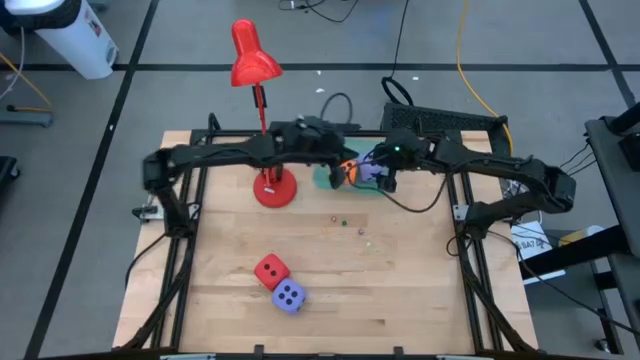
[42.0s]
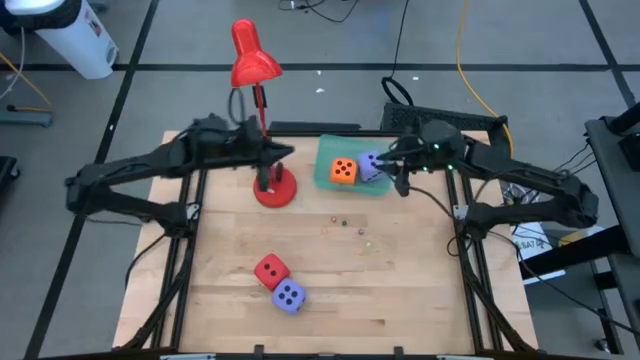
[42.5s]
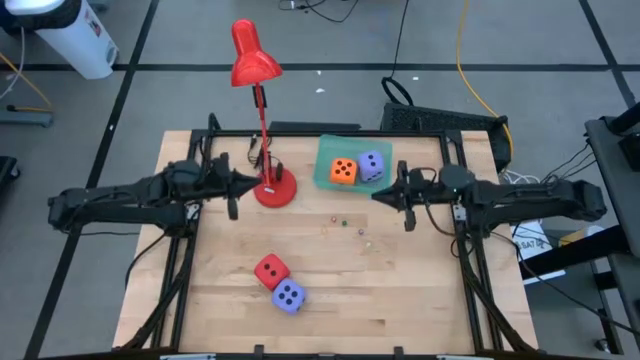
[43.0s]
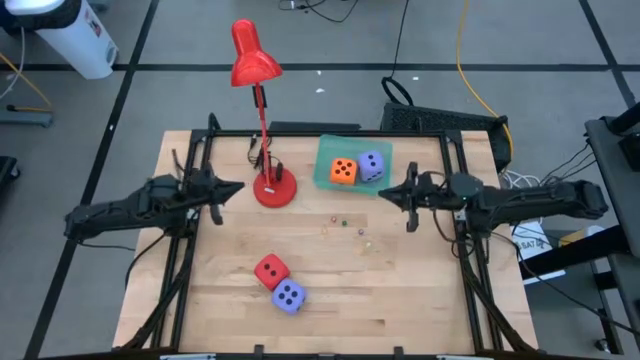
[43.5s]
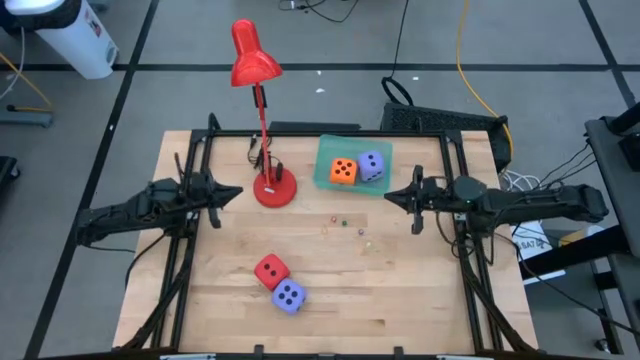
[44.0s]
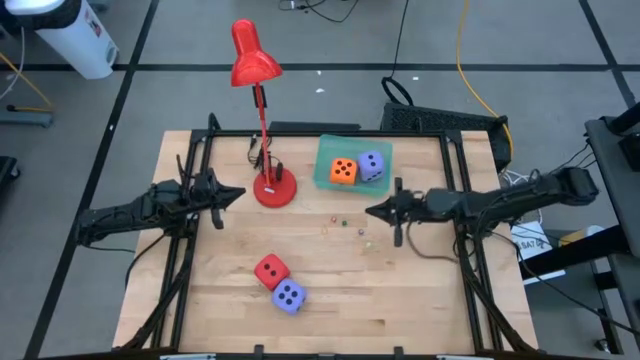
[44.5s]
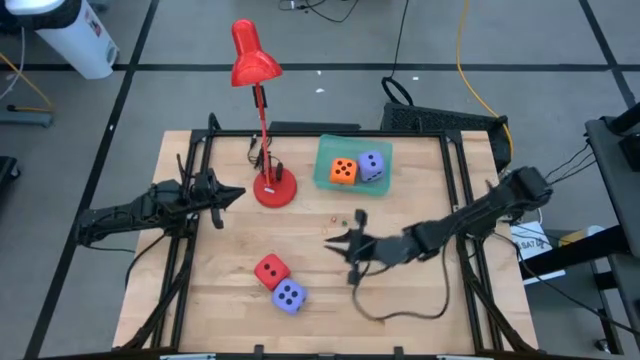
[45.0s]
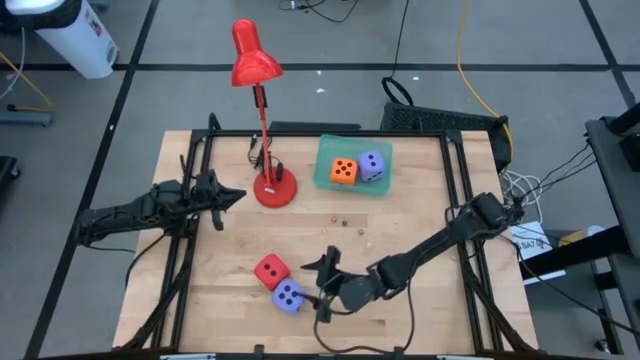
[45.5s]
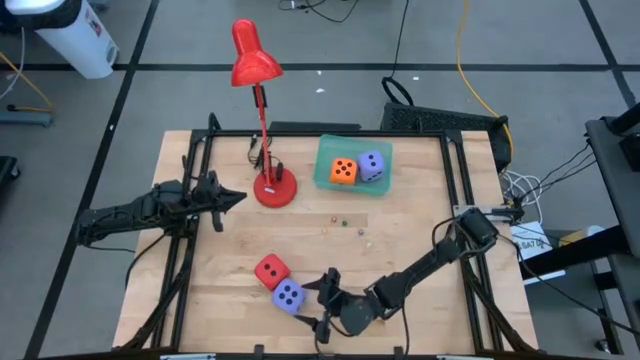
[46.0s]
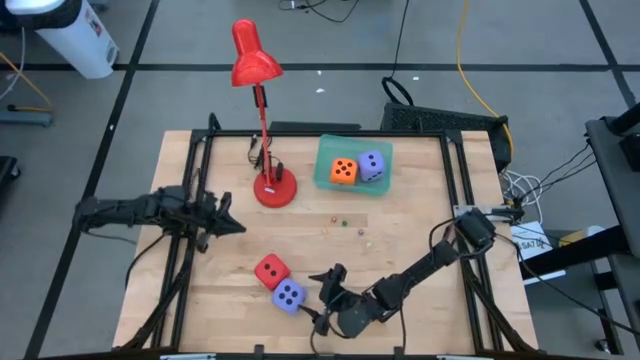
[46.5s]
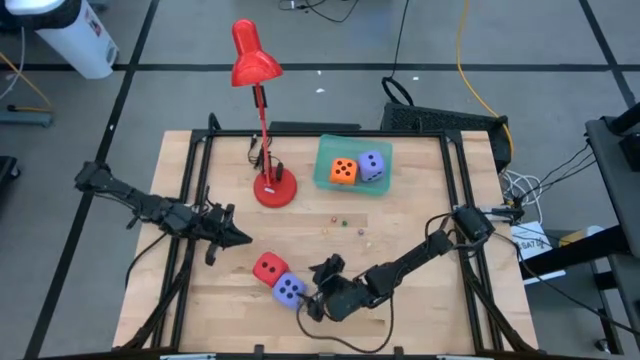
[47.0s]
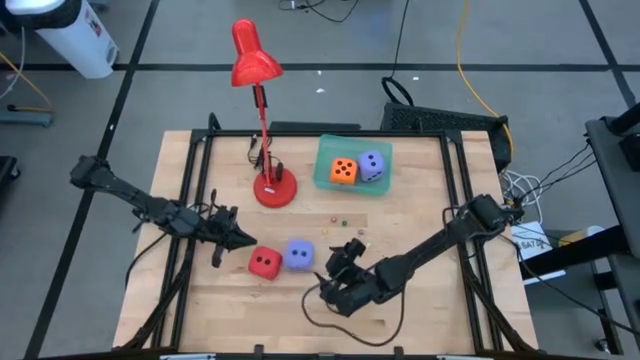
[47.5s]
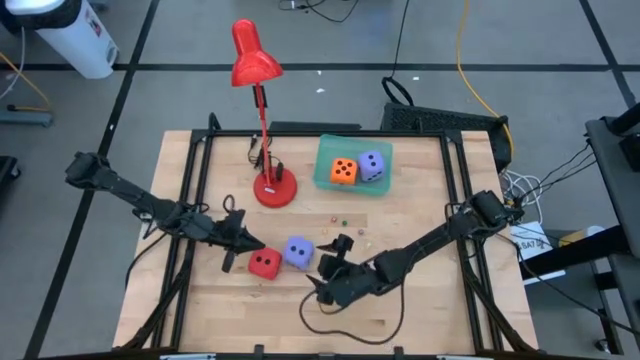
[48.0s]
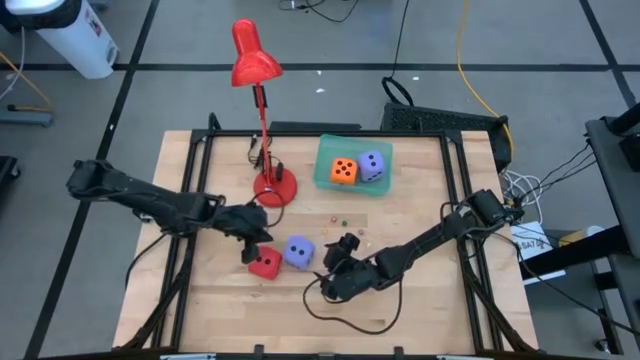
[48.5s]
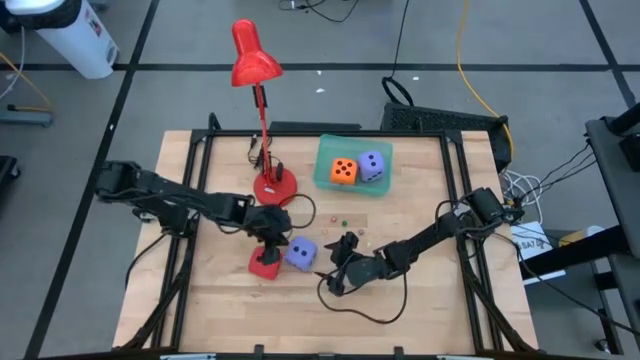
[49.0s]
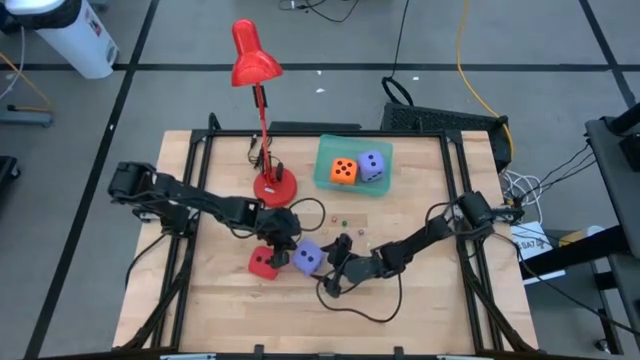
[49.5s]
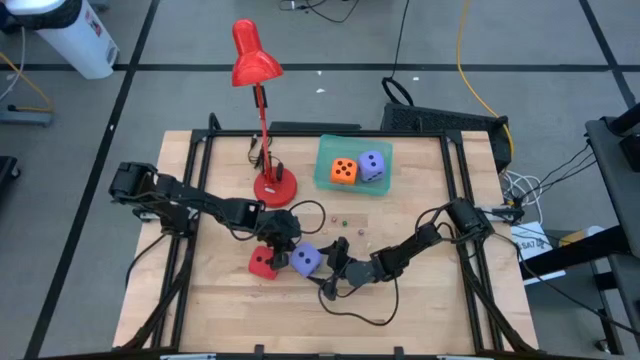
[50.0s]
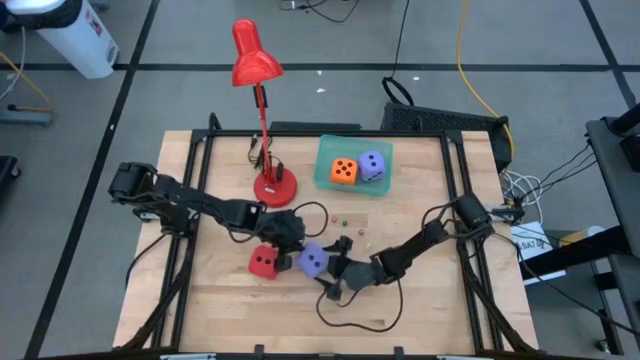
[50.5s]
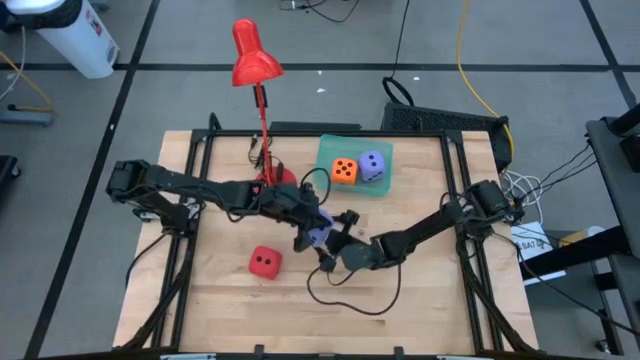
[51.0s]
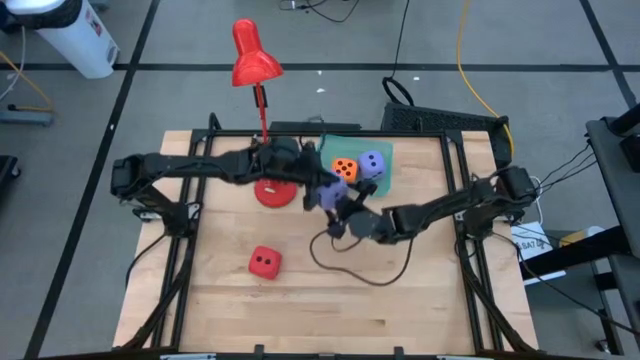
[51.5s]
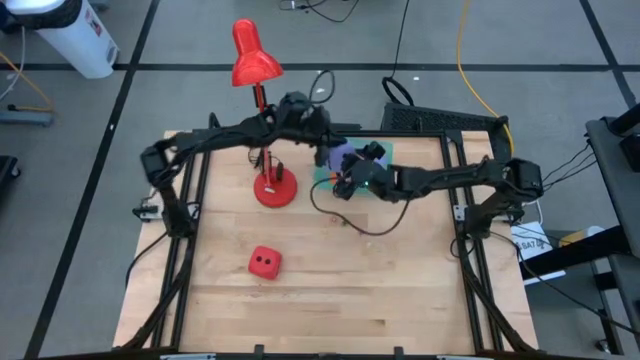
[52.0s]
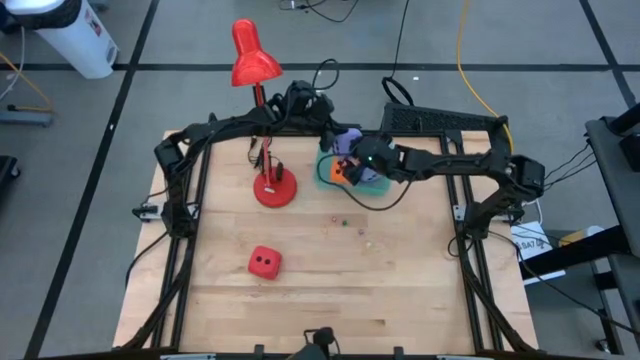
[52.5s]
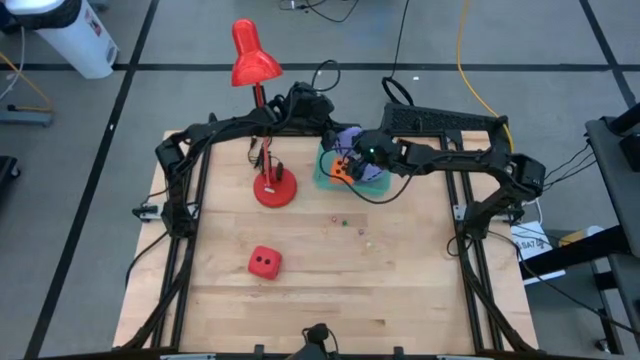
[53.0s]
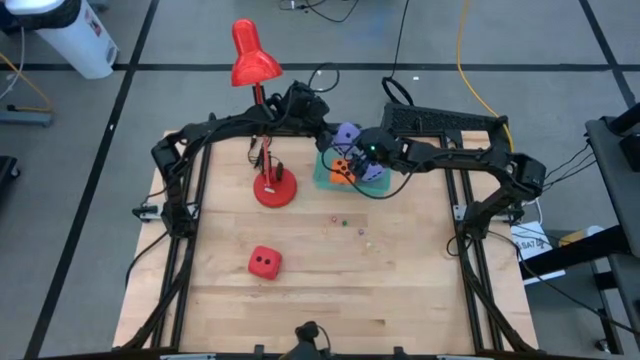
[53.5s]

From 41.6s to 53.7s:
Task: Pick & Place Dice
Put the big purple dice into the green bin
